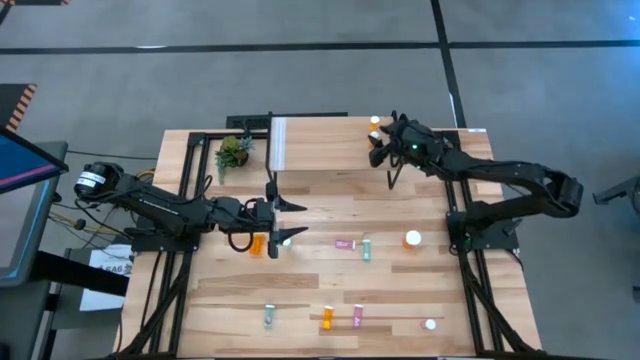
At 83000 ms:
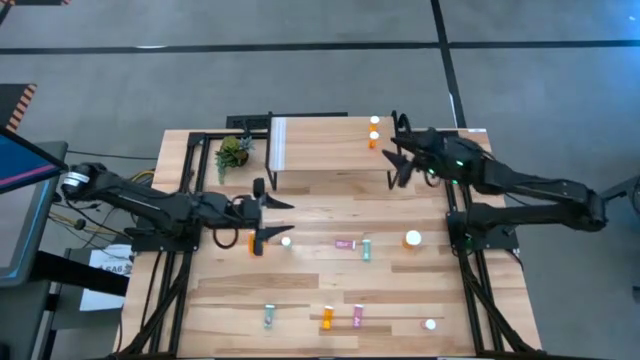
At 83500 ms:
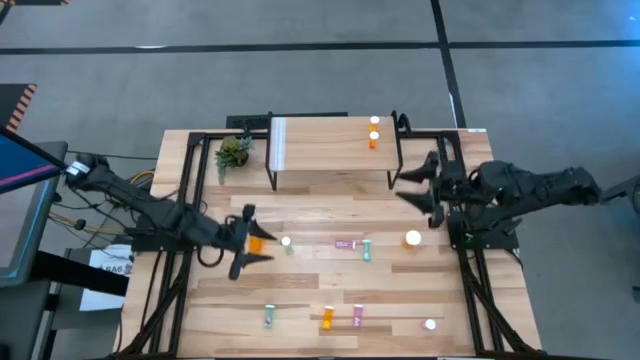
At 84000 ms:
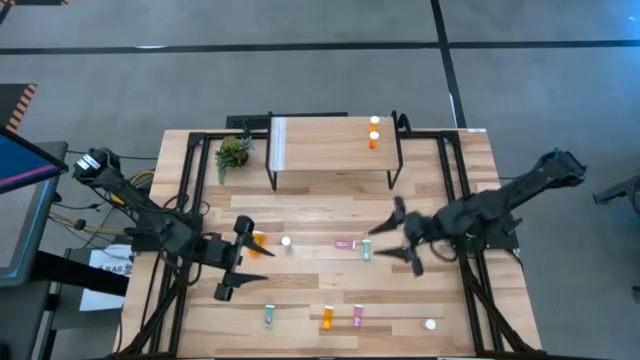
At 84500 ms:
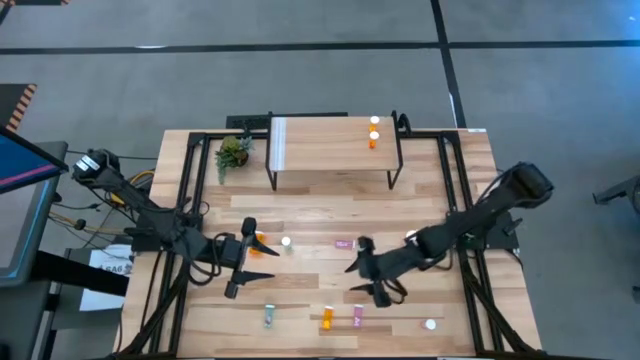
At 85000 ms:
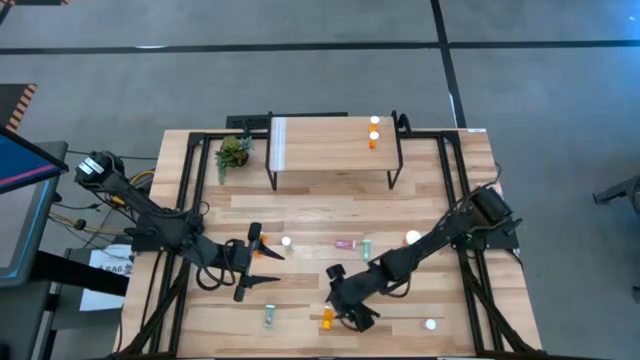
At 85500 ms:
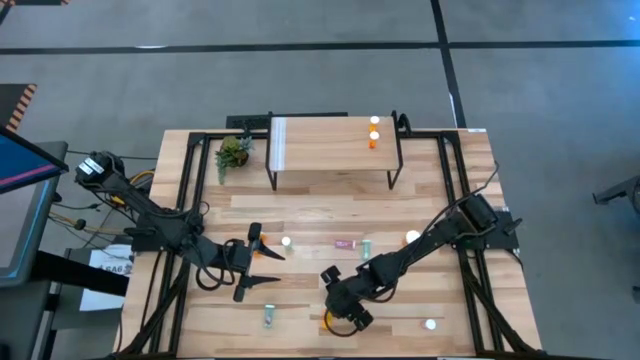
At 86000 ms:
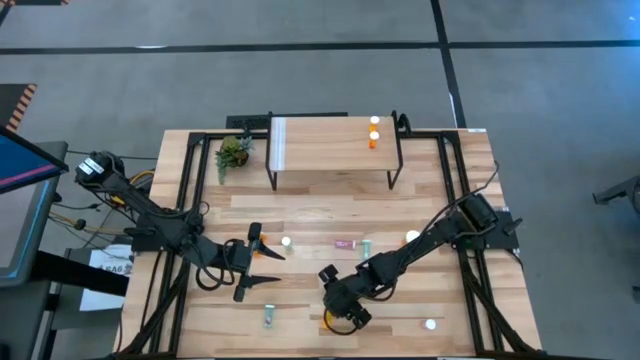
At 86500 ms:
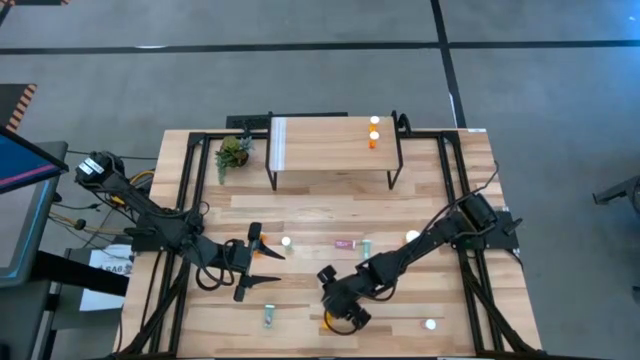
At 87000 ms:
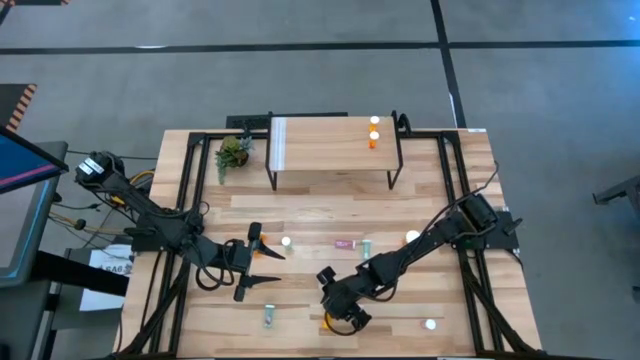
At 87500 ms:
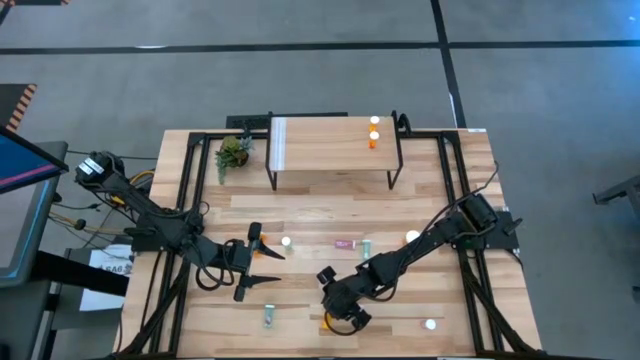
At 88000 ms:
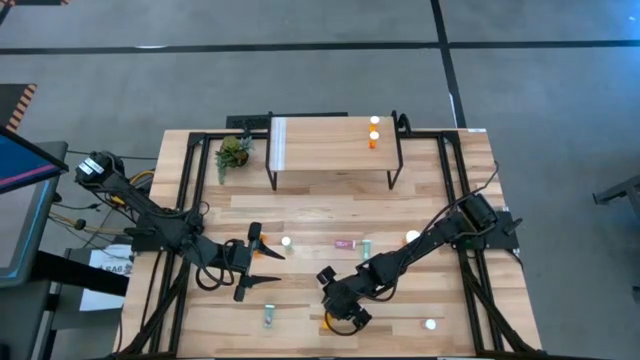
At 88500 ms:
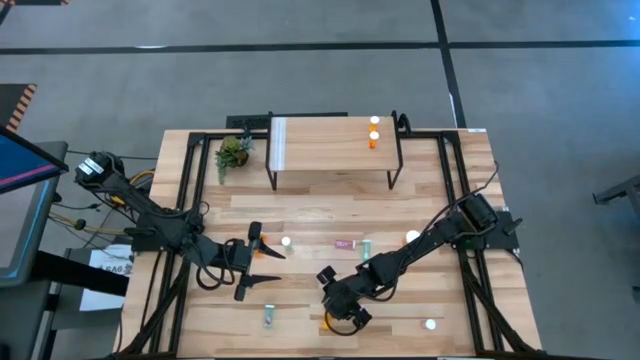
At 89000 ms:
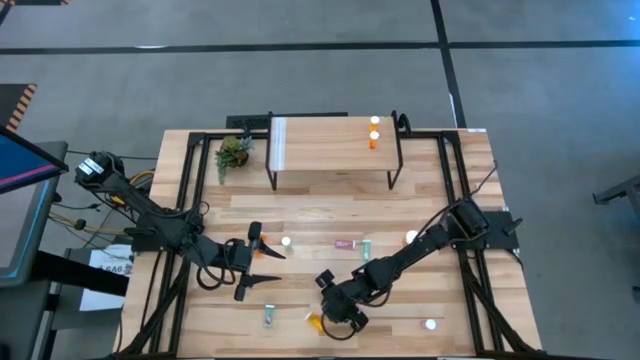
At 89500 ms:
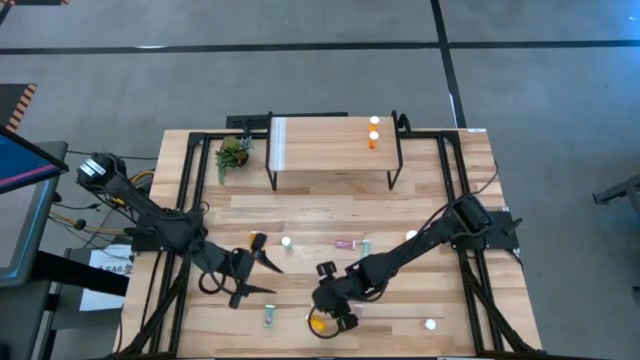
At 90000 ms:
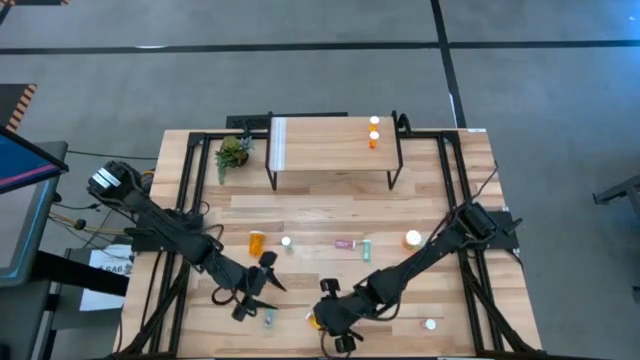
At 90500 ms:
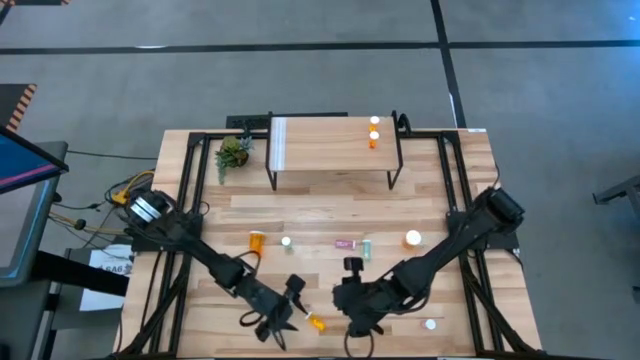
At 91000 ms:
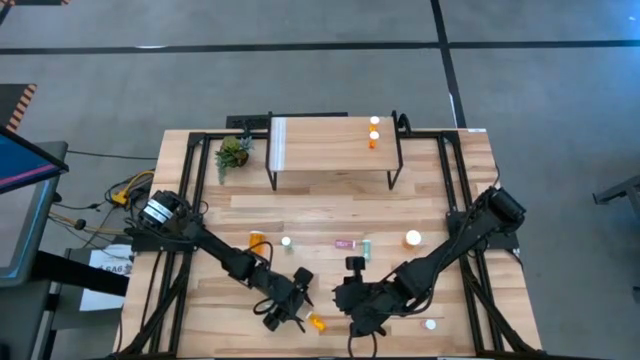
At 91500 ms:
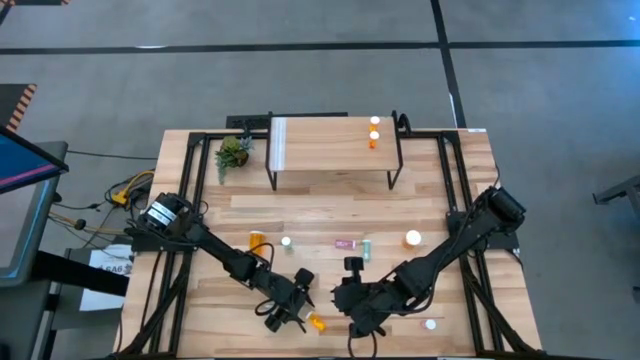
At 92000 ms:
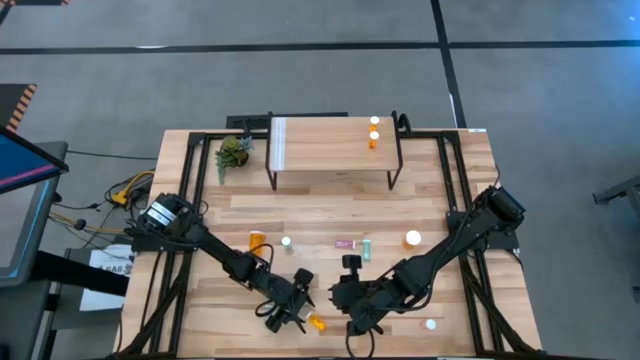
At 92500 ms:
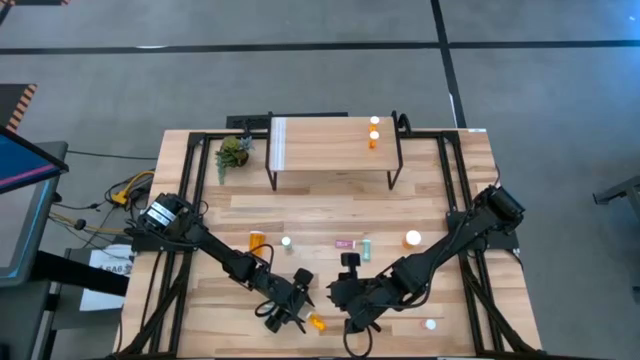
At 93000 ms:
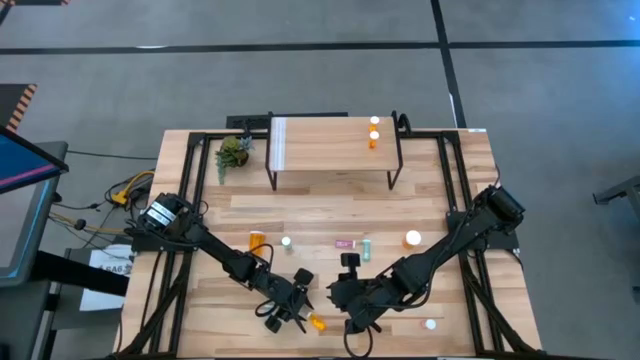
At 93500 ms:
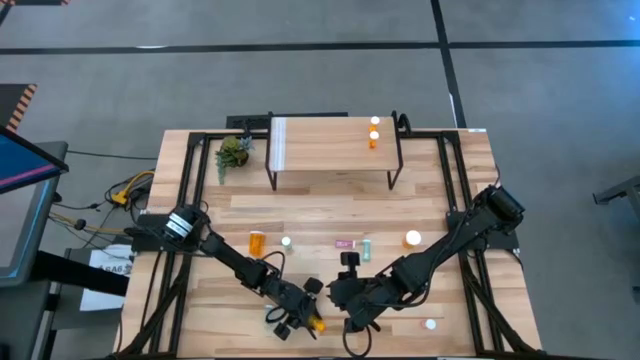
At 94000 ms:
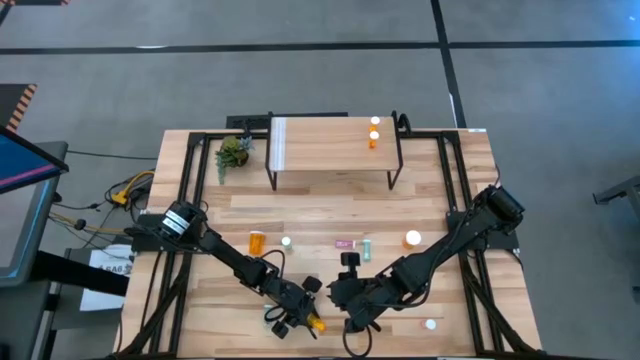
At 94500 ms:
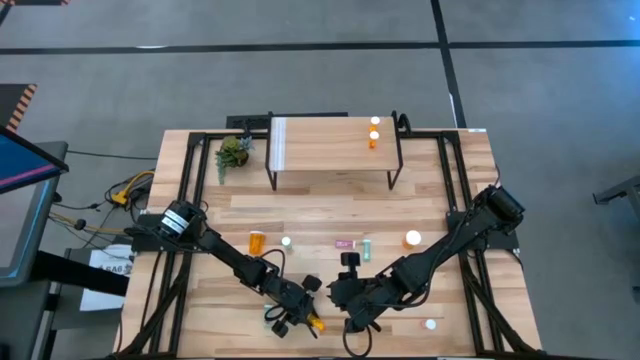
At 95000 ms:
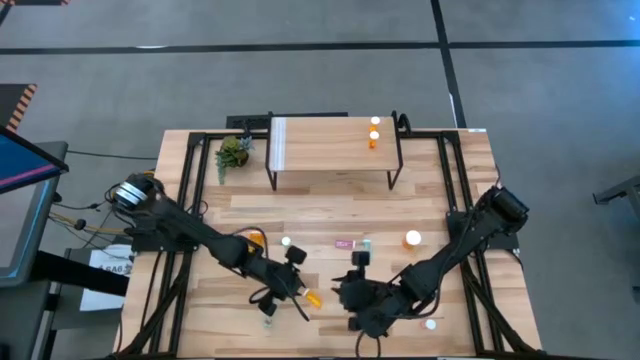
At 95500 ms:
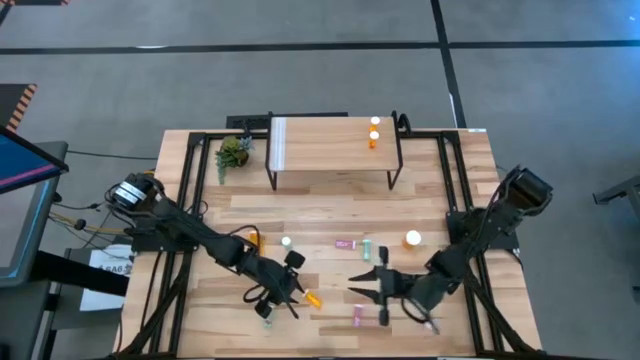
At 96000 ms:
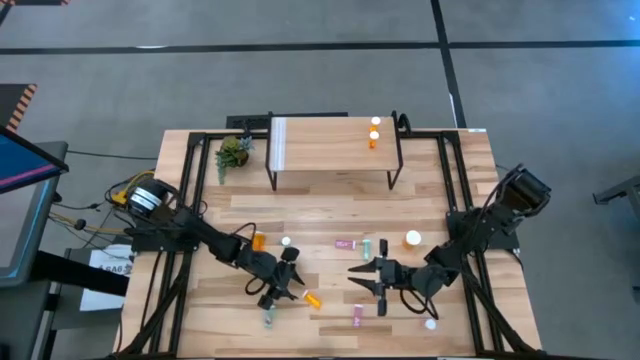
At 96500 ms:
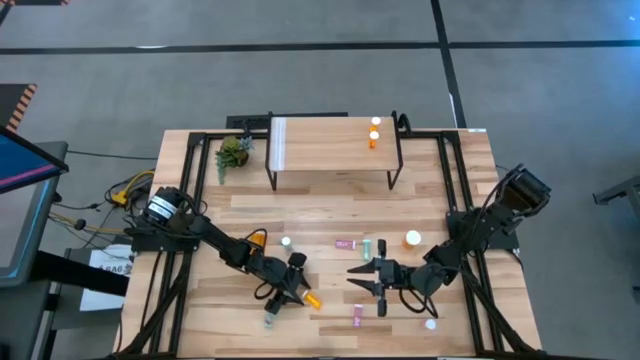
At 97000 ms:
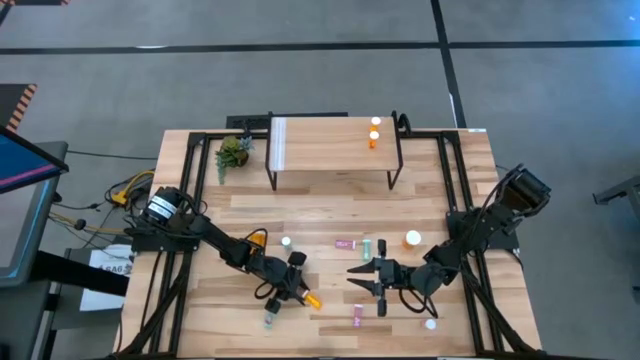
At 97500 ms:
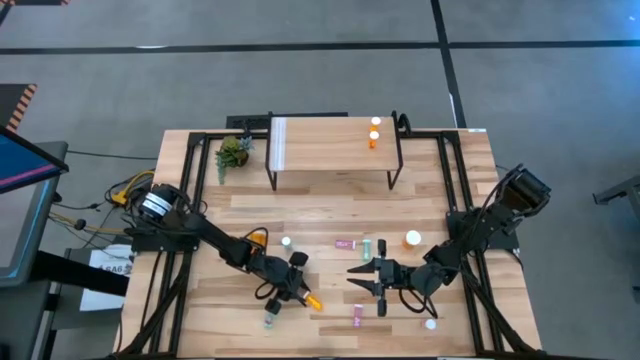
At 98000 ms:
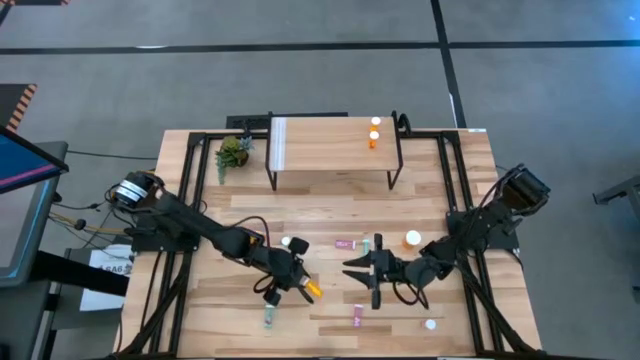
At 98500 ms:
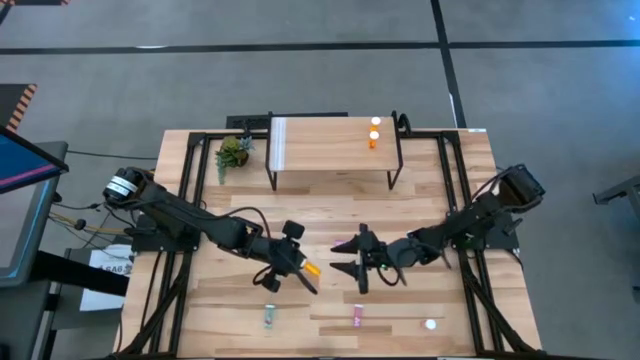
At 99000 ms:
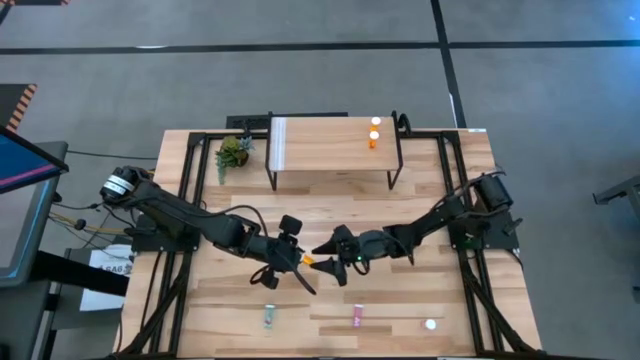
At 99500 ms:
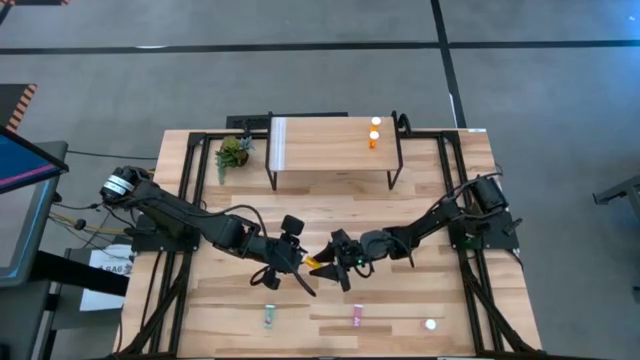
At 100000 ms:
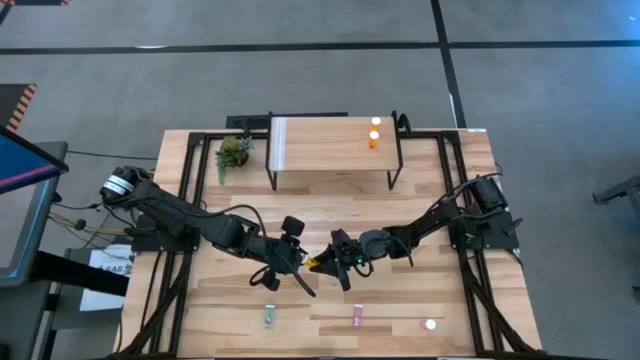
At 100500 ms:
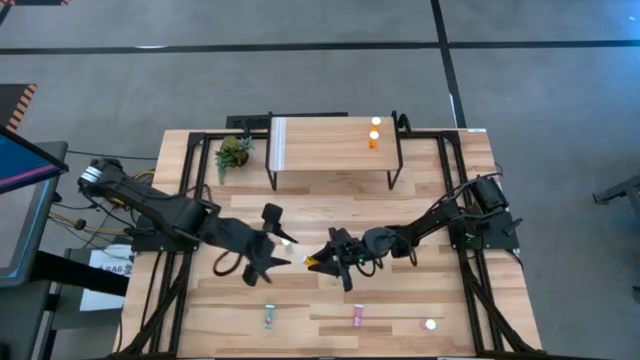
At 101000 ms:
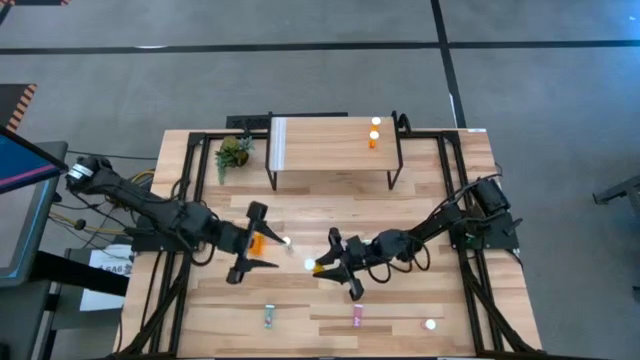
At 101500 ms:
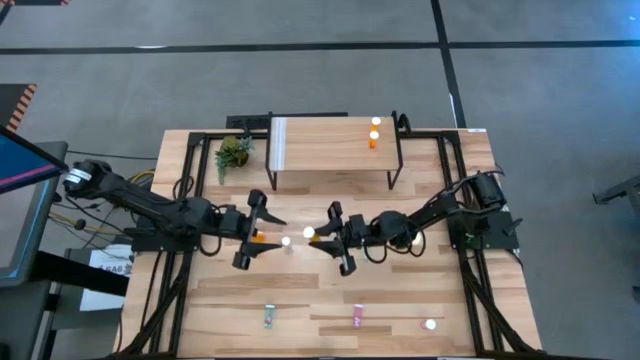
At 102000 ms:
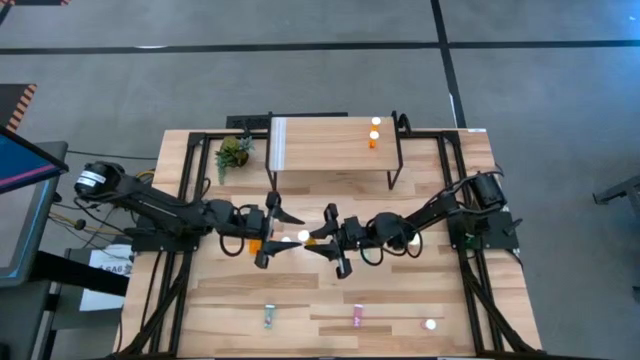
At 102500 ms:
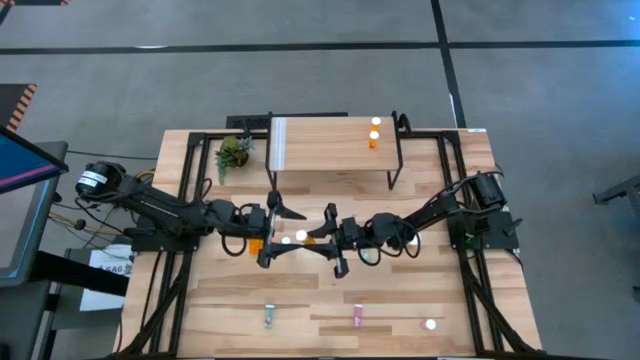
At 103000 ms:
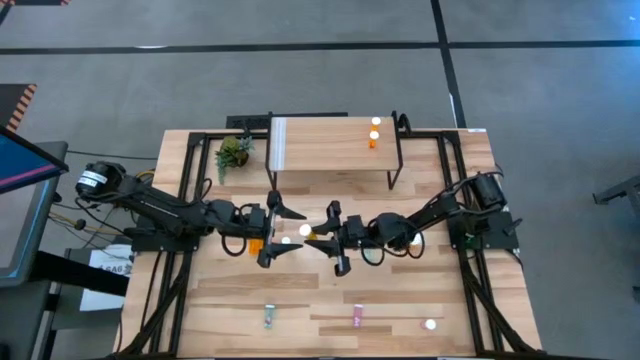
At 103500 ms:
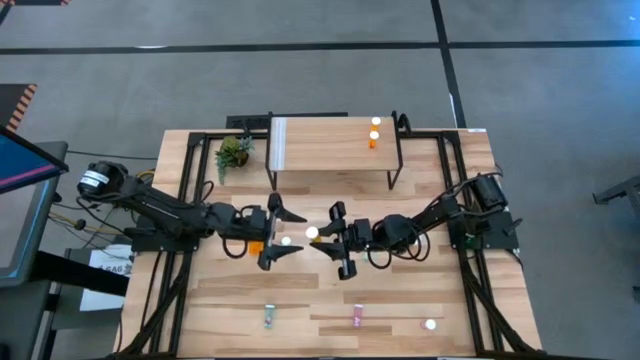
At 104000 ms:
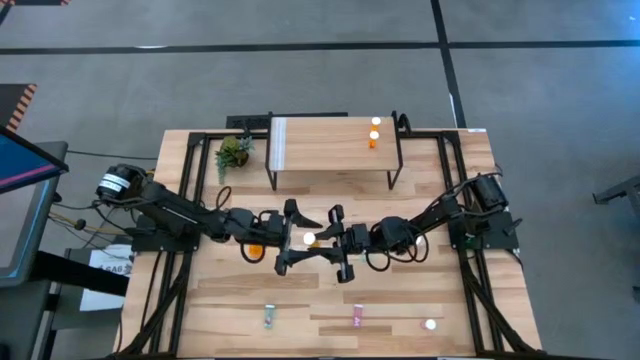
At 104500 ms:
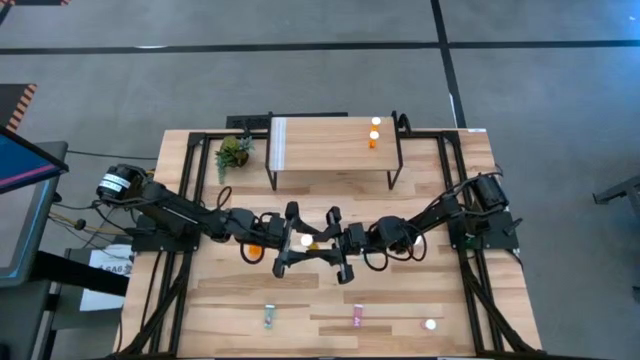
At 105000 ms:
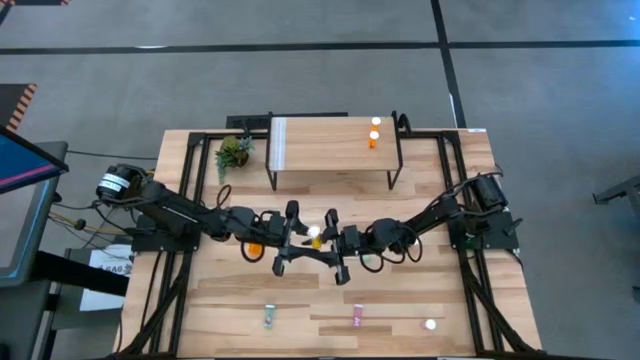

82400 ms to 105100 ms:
Task: Pick and place medicine bottles onto shelf by color
Put the small orange pill bottle on the shelf aligned with the other small orange pill bottles
